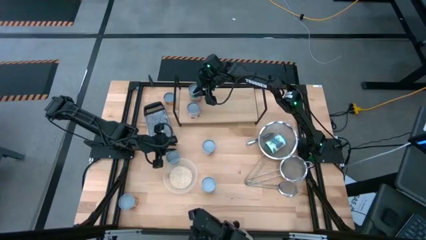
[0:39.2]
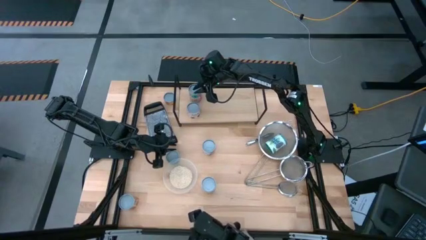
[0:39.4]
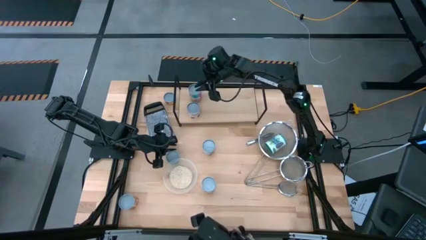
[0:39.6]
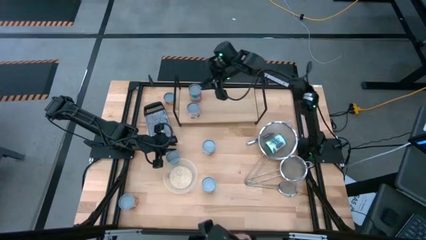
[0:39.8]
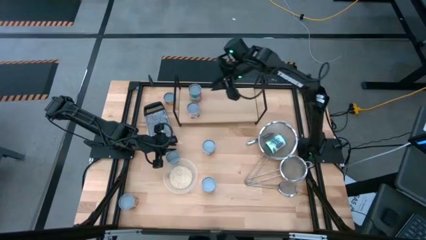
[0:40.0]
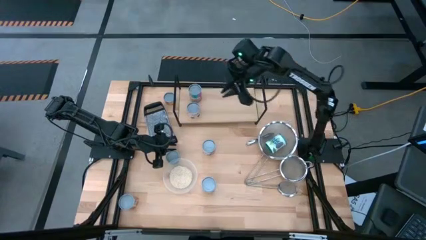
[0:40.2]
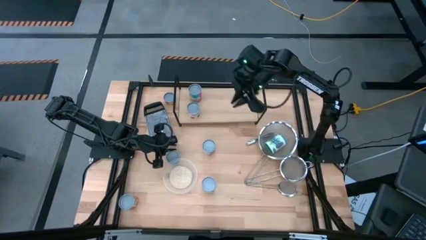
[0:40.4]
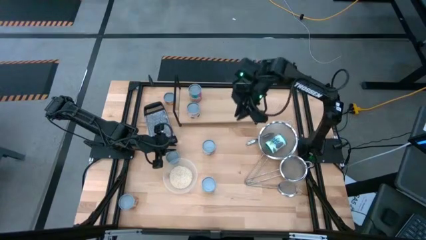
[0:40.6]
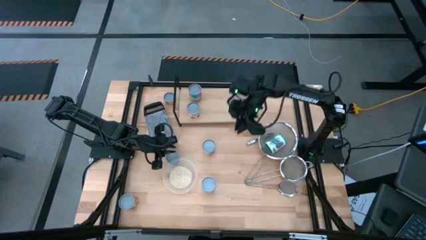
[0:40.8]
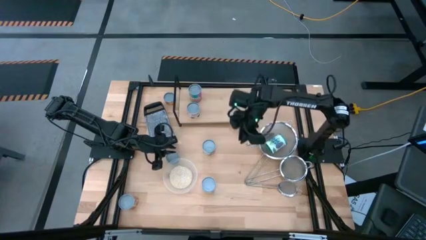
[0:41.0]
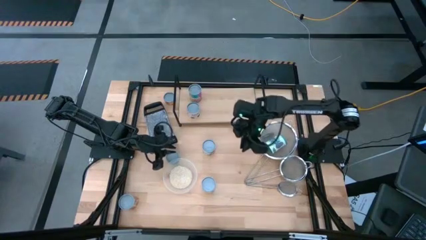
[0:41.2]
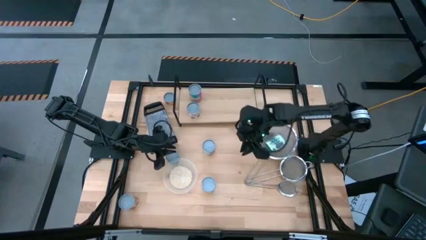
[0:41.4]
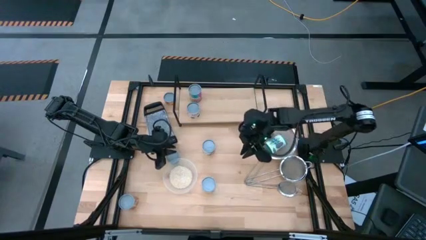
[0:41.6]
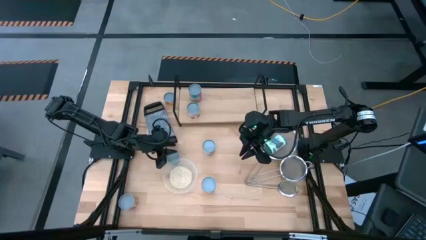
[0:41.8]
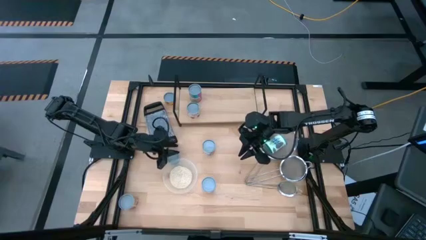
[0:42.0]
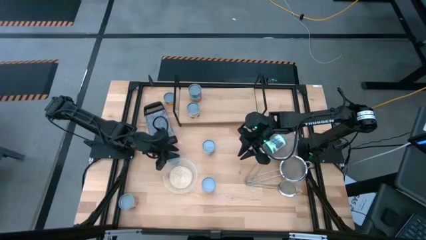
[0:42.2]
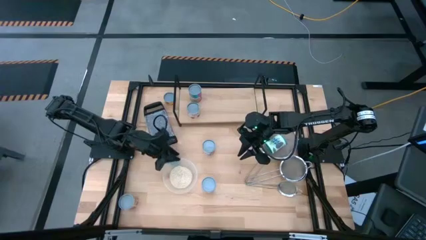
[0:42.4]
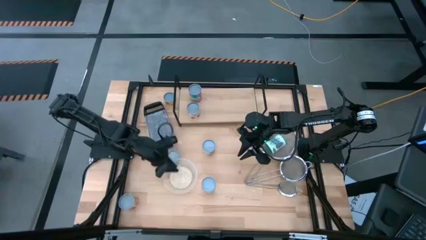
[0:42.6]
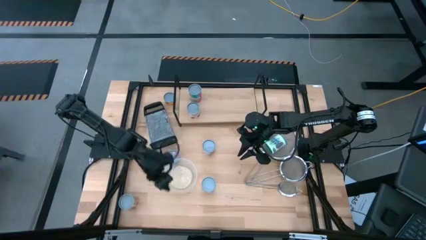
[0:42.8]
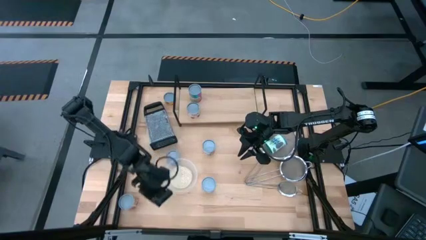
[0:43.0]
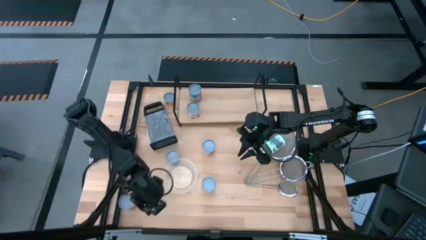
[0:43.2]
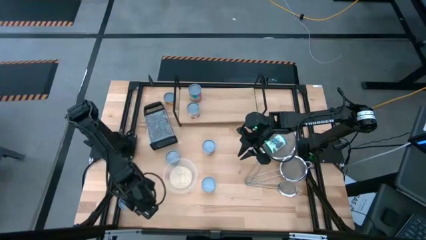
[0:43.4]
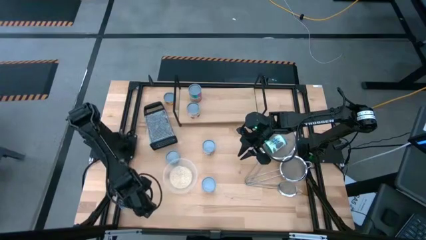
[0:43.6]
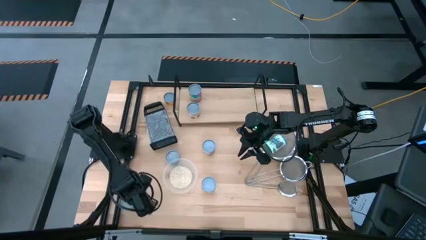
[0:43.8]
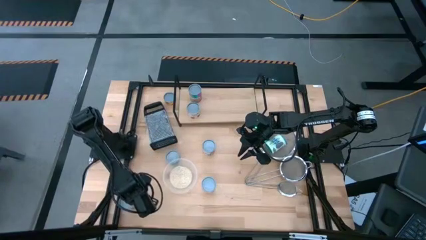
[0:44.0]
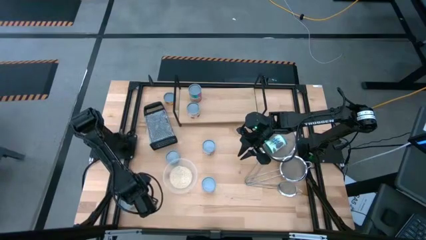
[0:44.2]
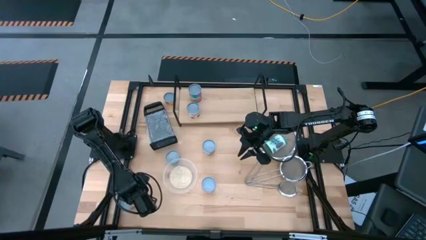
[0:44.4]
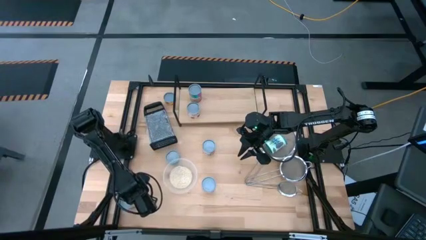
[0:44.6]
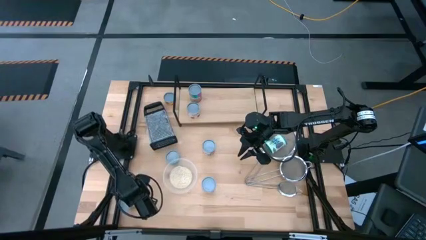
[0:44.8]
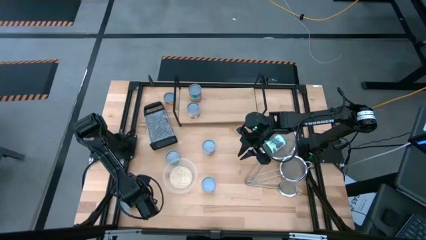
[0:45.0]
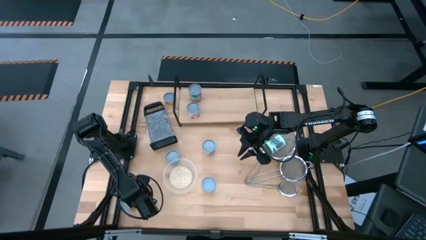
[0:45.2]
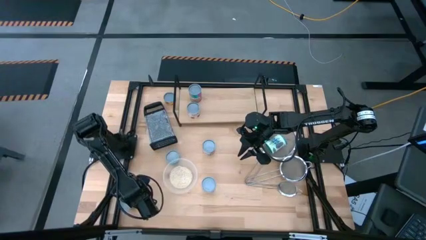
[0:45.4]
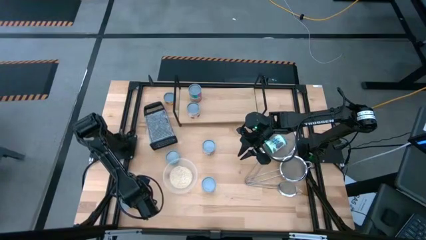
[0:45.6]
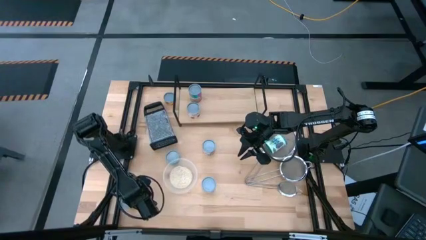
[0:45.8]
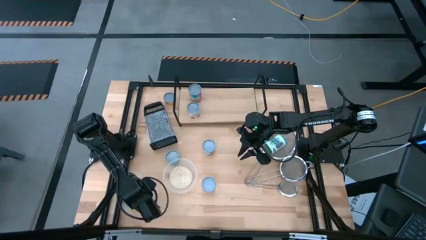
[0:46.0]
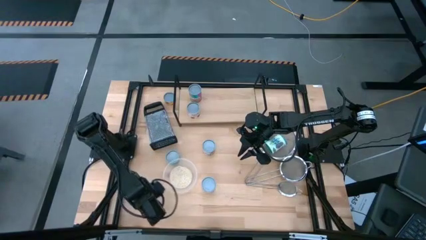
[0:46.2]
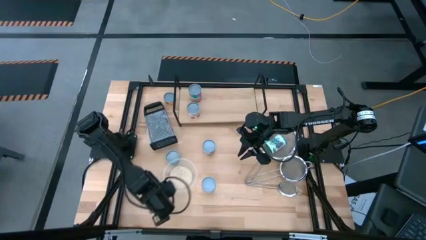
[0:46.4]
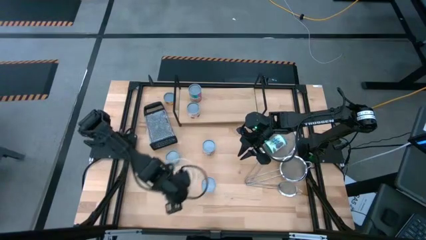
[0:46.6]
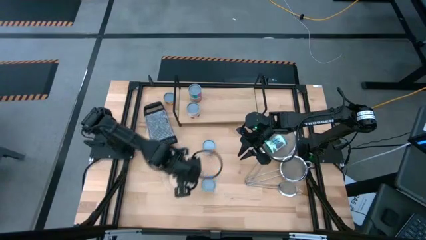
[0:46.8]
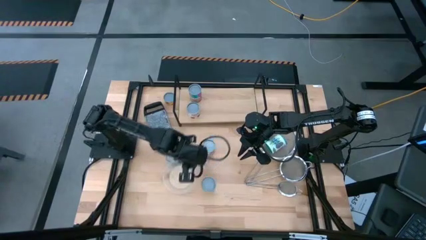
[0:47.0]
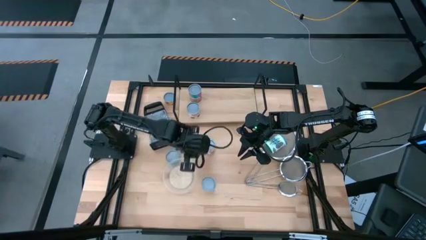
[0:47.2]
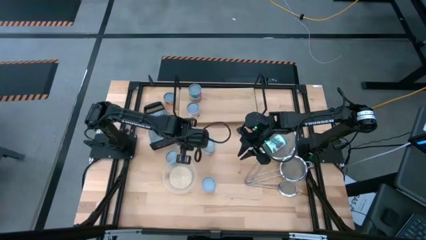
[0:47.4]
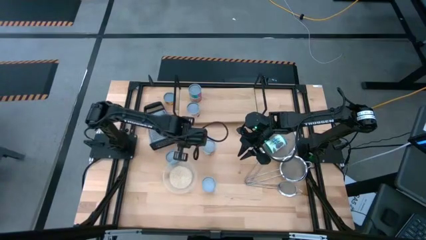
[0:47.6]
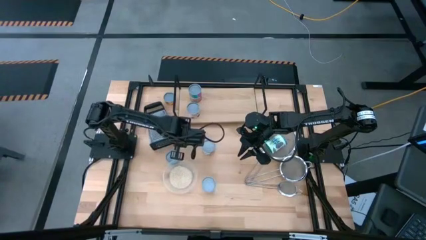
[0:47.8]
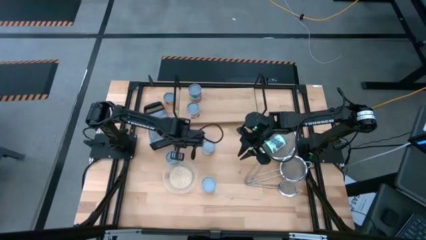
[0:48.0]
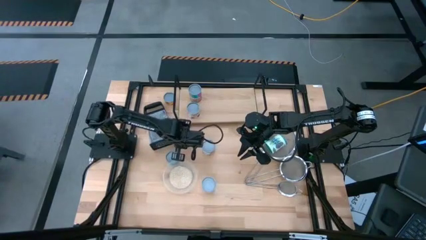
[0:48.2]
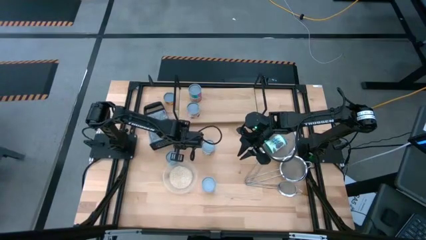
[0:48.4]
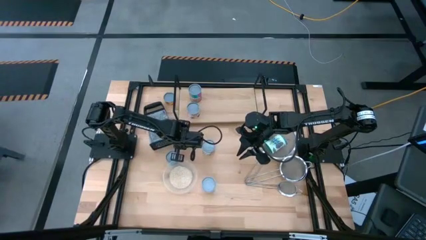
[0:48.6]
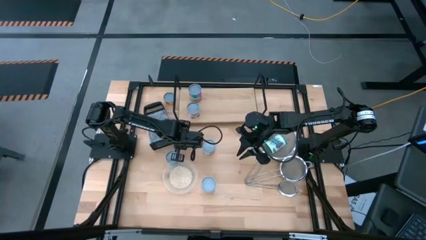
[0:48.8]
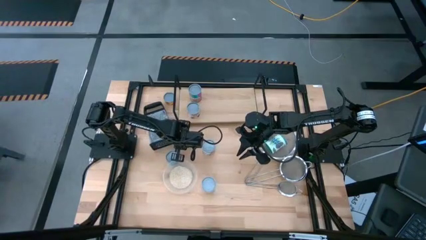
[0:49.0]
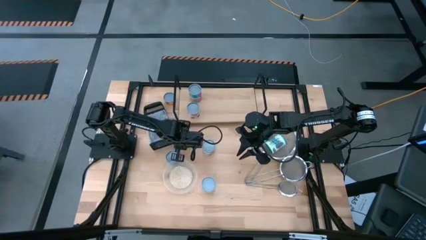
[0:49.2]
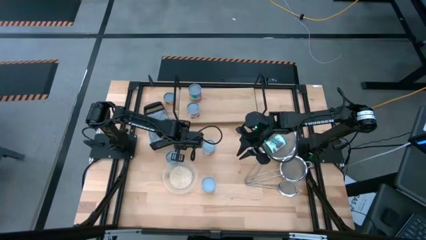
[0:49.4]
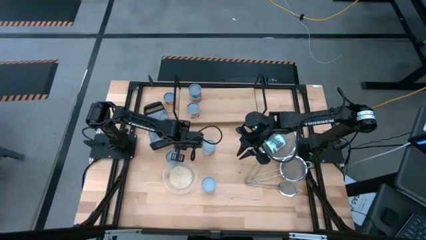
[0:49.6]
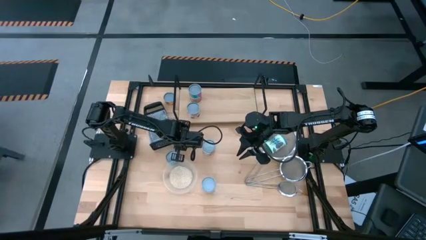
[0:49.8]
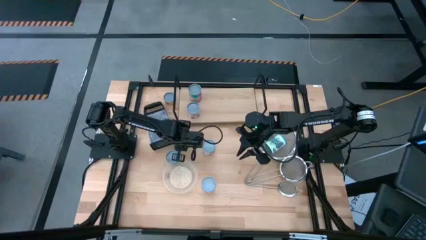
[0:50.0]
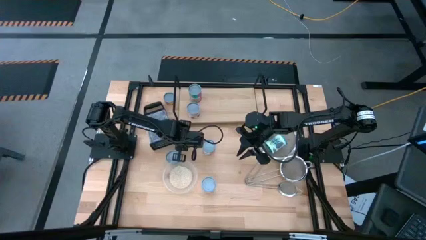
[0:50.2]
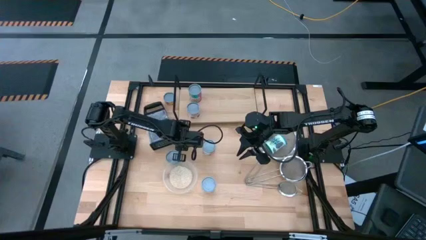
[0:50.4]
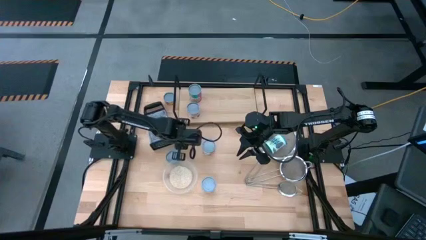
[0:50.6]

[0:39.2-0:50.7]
Task: Pick and place cans onto a shelf
Put the pink diced tomato can on the shelf
